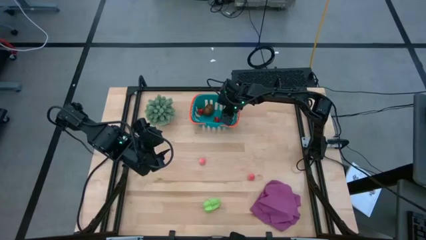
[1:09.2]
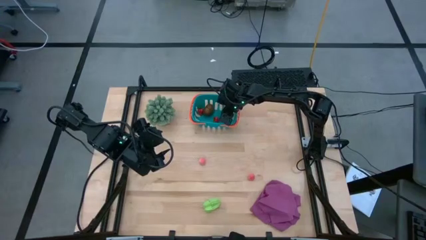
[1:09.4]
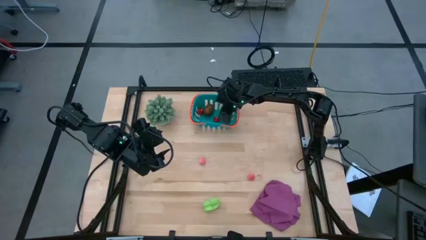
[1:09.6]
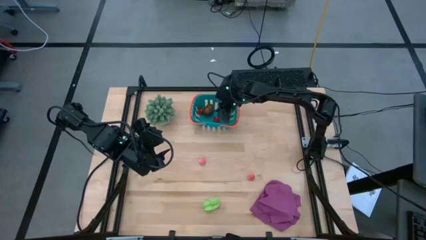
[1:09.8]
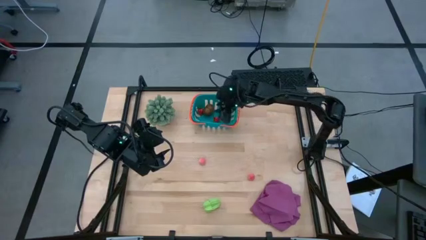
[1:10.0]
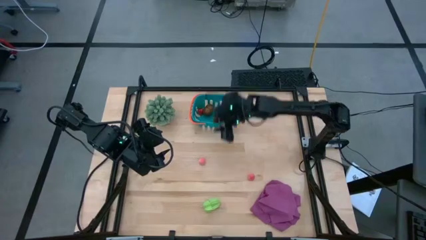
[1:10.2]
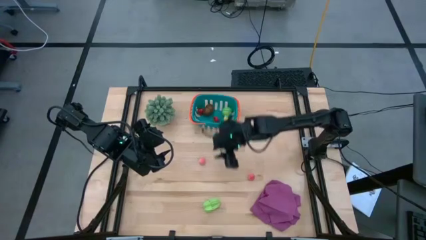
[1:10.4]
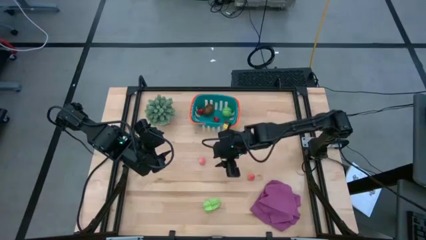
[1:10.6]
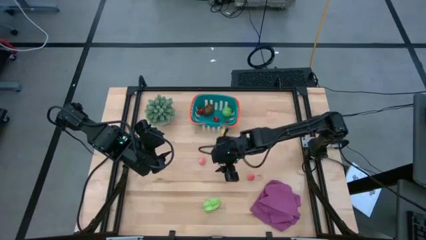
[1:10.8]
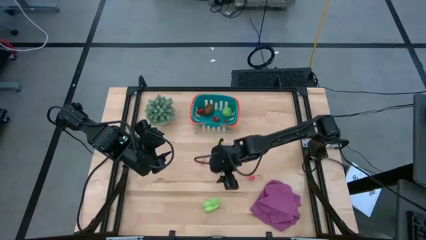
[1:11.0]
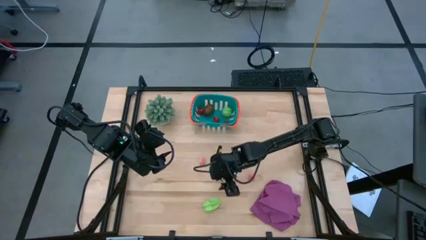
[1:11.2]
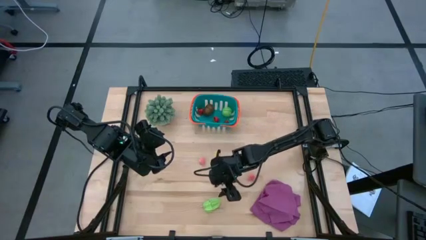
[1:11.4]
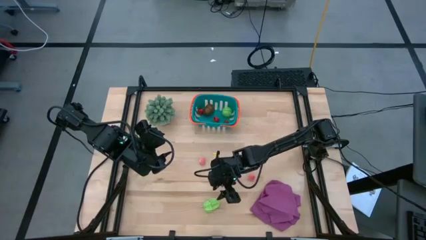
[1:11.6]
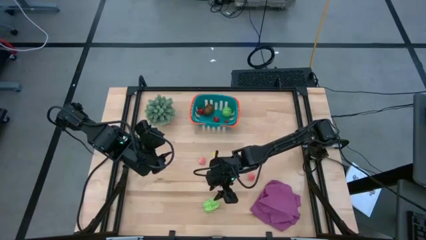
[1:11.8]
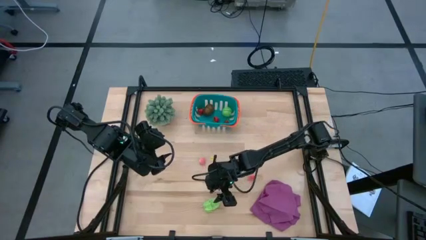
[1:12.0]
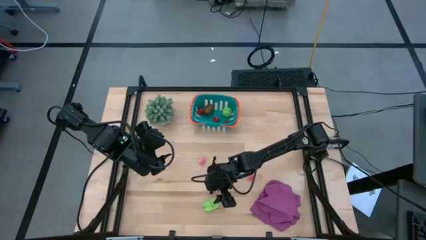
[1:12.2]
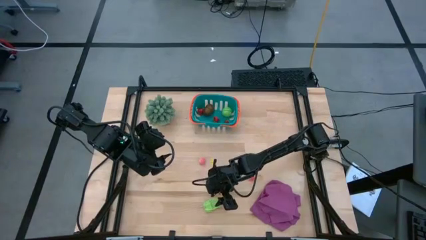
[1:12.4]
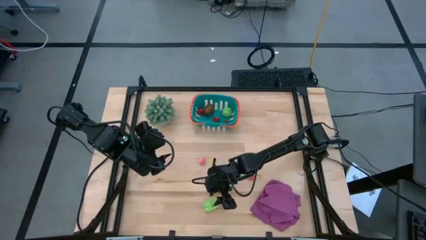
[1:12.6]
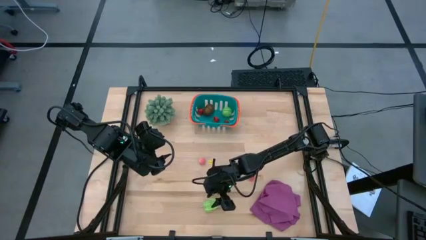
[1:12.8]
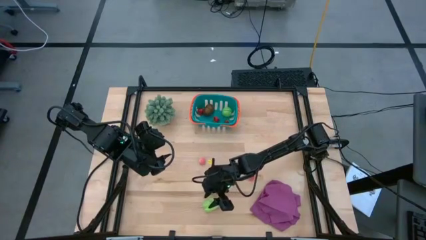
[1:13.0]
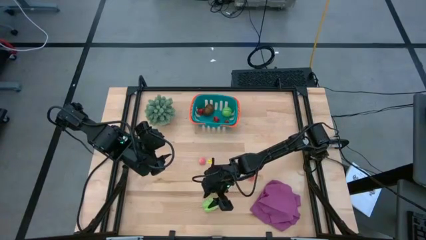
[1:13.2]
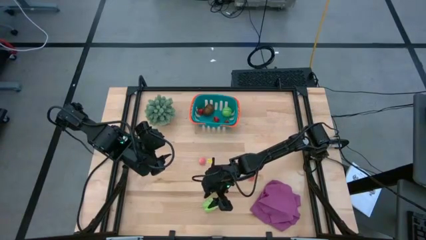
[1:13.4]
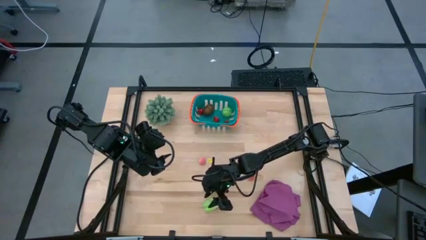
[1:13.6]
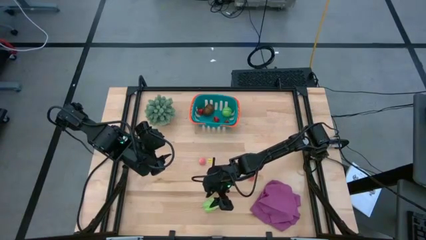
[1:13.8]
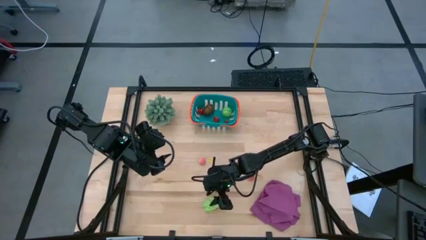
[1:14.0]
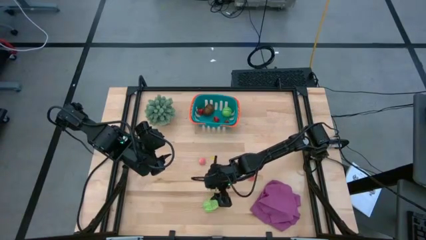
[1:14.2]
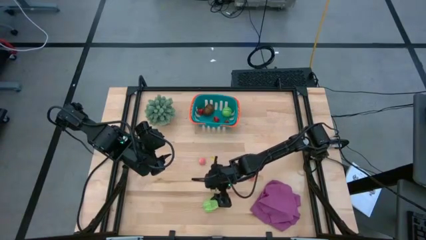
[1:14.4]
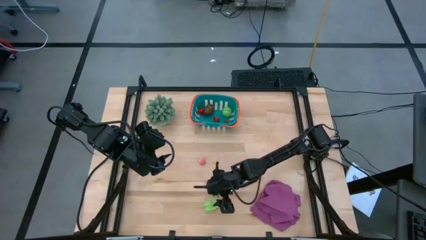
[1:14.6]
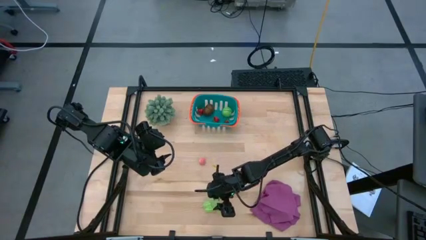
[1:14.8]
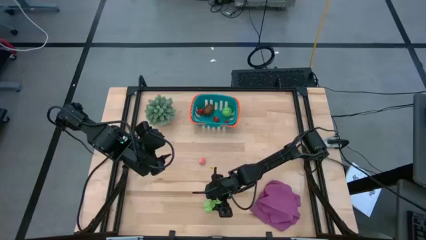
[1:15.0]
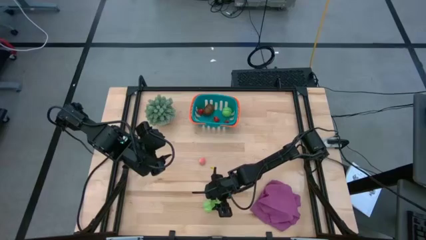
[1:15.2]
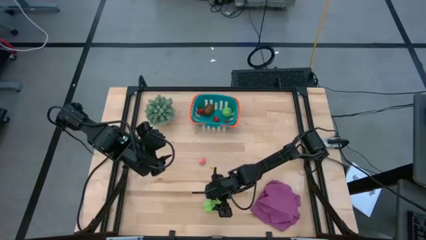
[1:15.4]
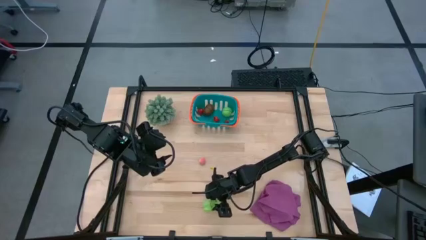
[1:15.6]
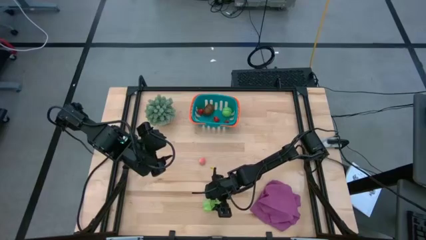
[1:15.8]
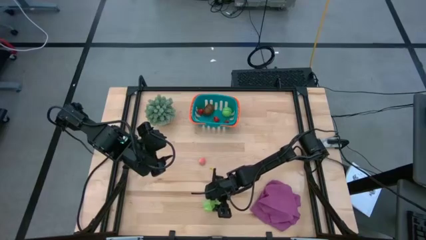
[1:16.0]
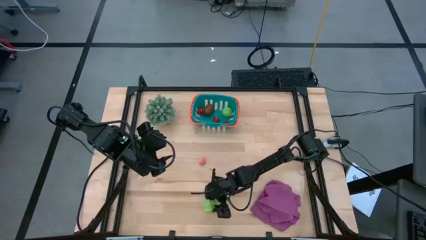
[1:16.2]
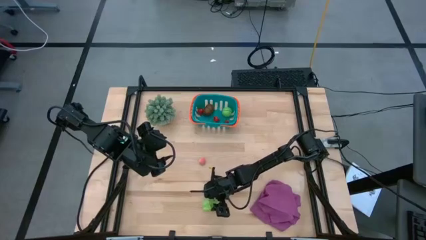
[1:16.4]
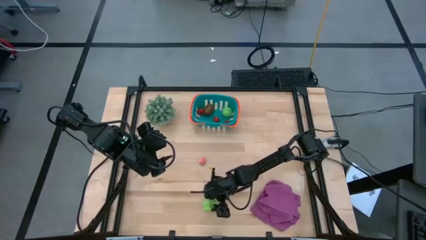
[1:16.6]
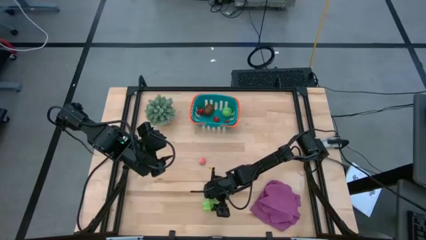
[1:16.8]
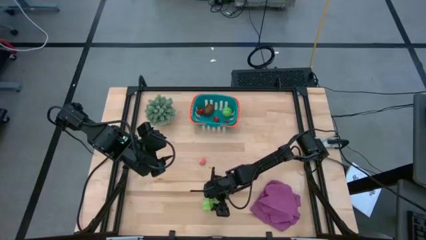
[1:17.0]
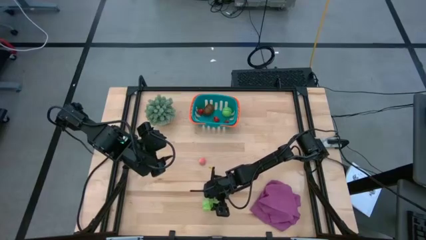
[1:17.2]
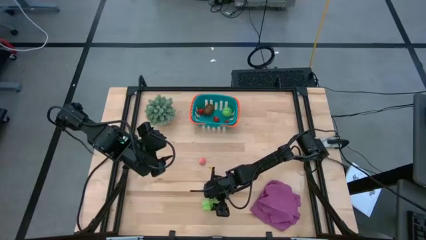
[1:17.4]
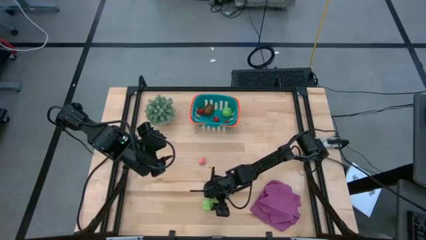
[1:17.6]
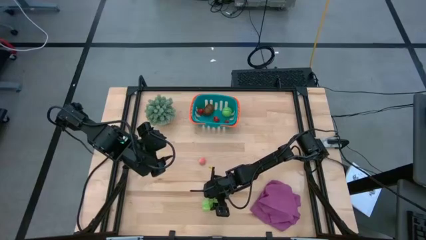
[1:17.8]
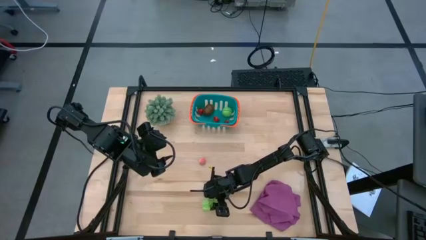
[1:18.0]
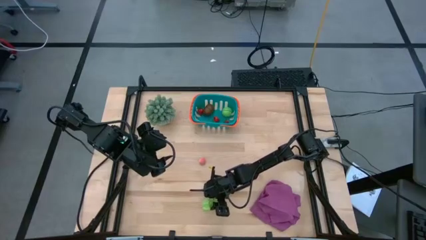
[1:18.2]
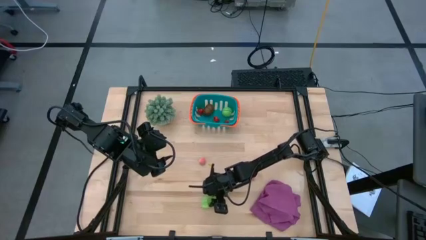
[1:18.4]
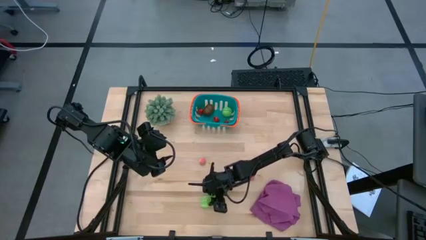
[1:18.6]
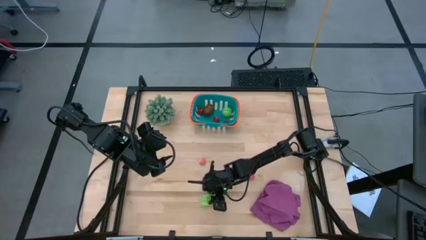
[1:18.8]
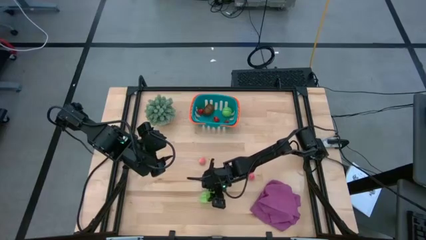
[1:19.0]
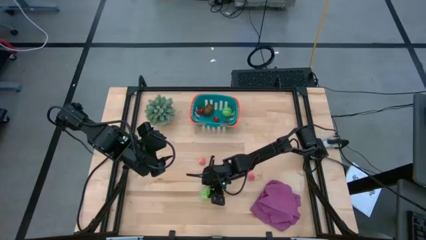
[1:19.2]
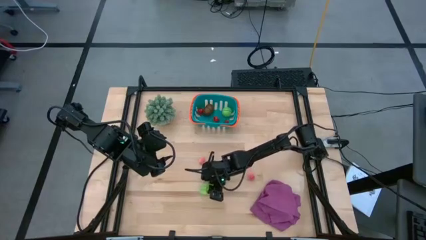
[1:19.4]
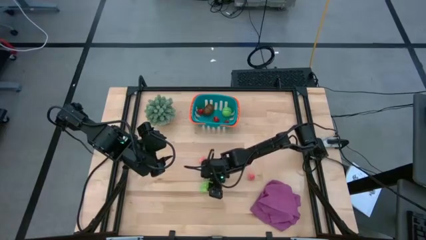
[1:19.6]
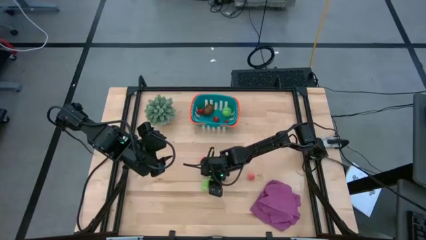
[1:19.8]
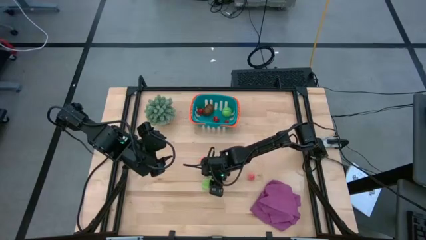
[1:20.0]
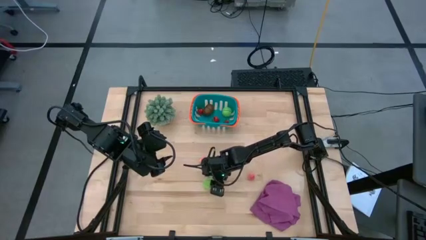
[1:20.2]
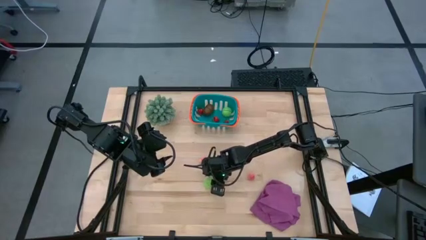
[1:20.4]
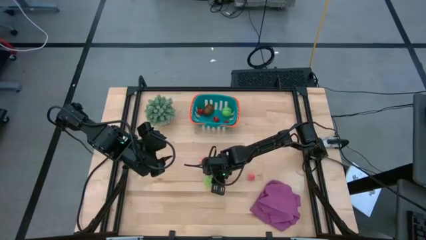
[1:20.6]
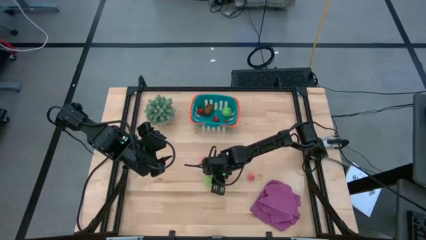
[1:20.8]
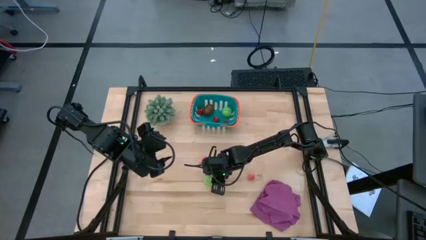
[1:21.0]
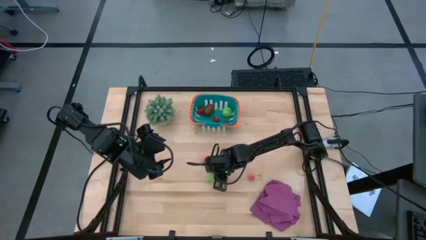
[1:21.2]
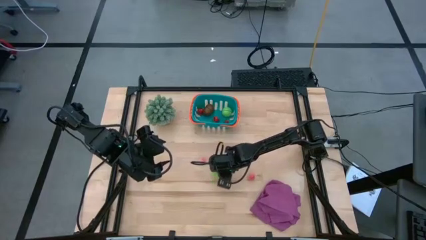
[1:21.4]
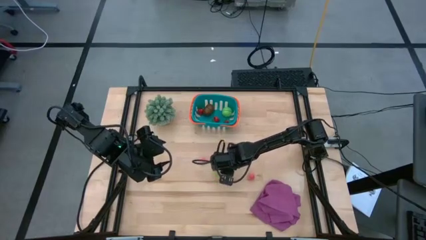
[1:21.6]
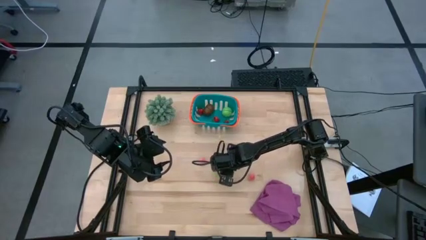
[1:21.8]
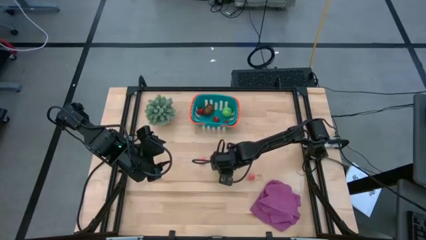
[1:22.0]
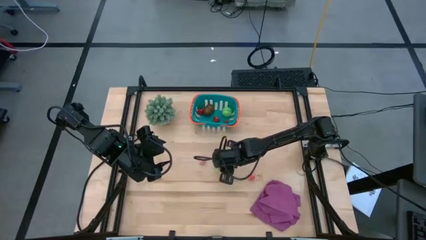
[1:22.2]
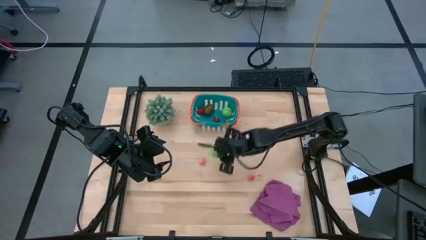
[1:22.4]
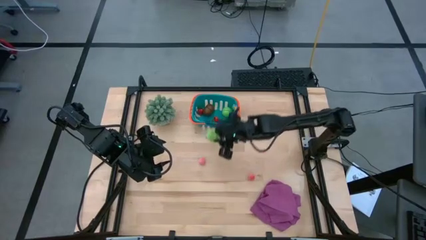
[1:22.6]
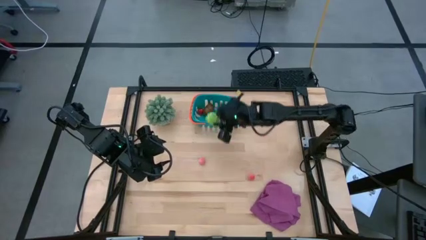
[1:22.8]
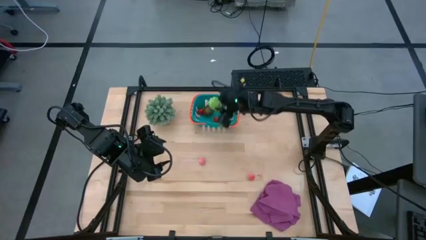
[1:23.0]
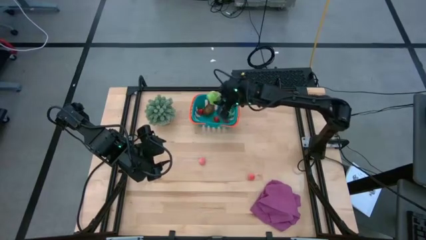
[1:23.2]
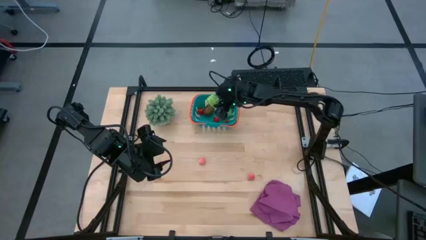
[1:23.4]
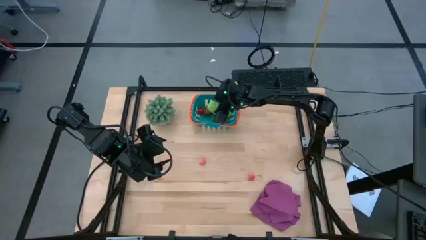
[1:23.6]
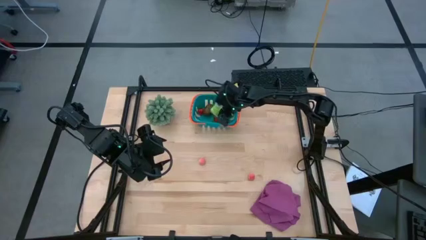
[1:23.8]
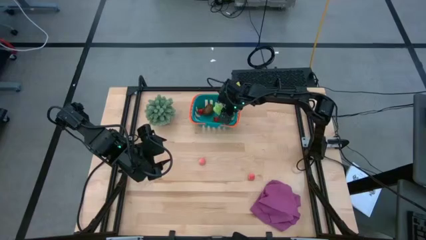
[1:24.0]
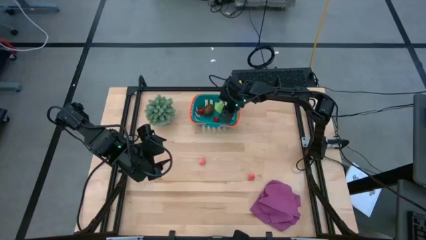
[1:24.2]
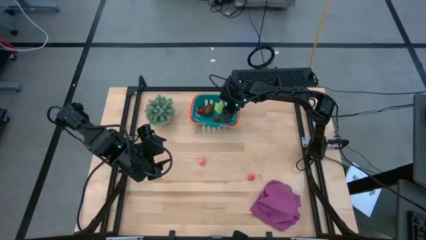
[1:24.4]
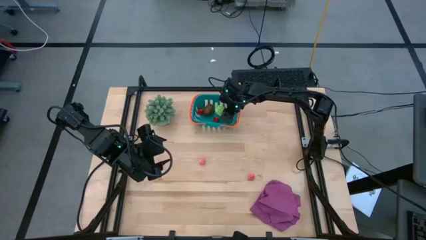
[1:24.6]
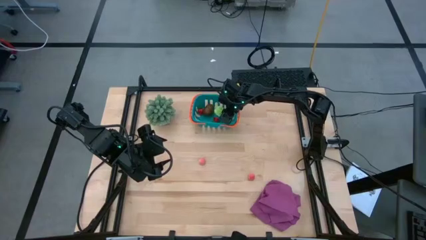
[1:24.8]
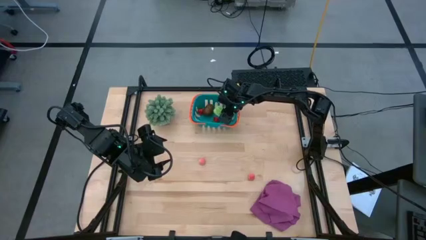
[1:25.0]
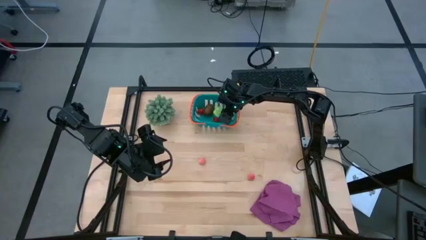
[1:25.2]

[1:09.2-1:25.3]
Task: Pick and placing Produce into tupperware
Put the green starfruit into the blue basket
